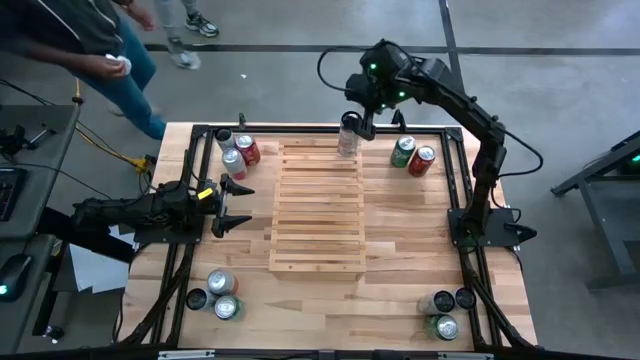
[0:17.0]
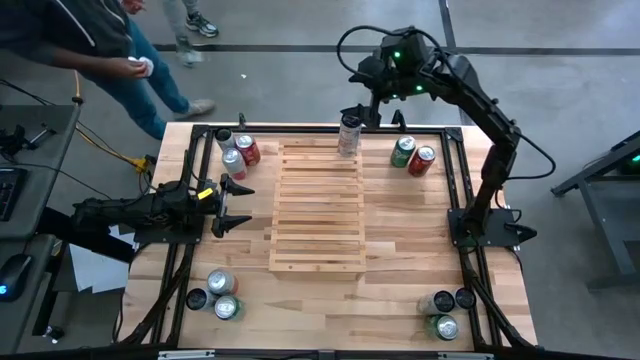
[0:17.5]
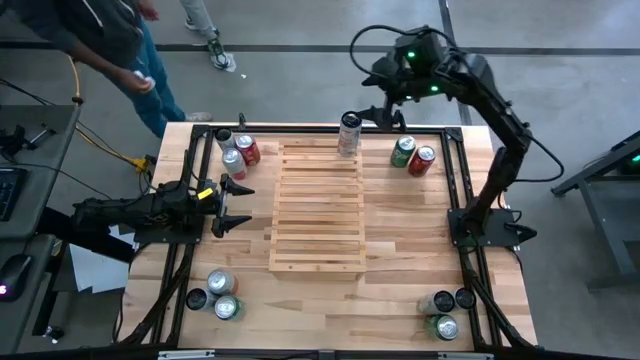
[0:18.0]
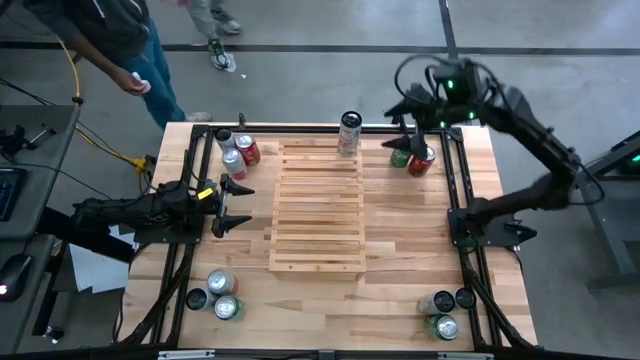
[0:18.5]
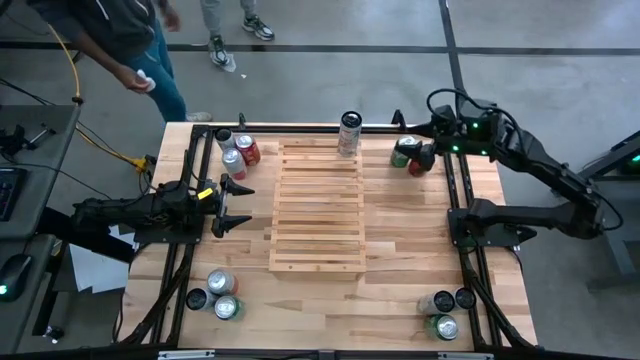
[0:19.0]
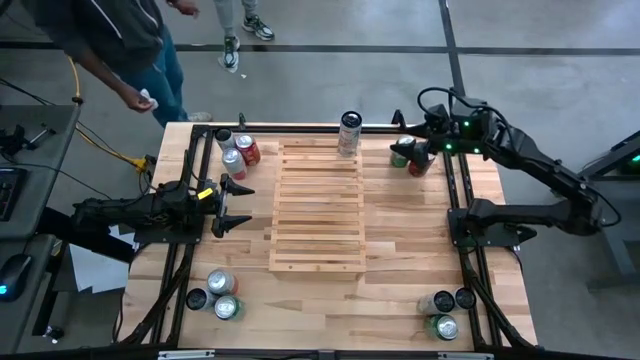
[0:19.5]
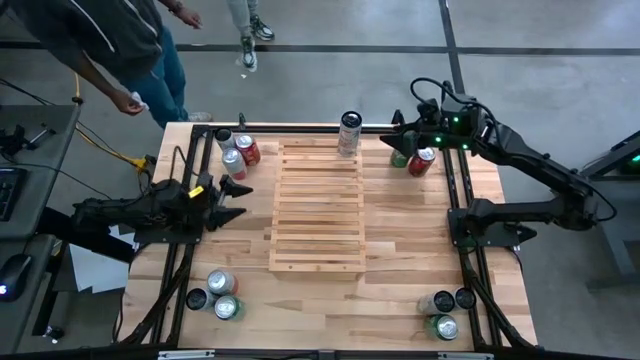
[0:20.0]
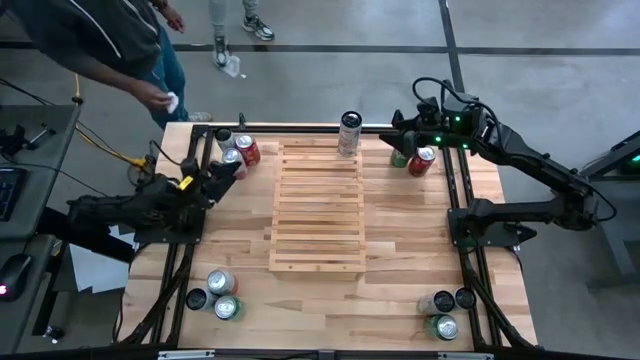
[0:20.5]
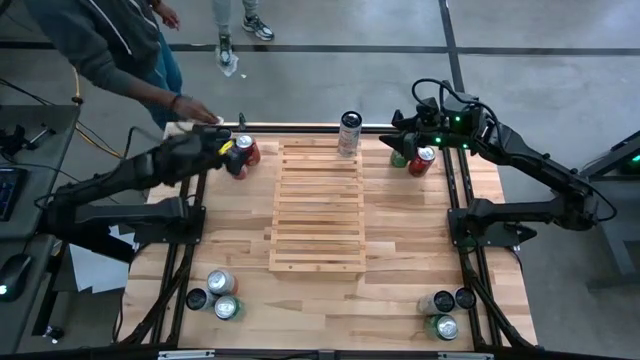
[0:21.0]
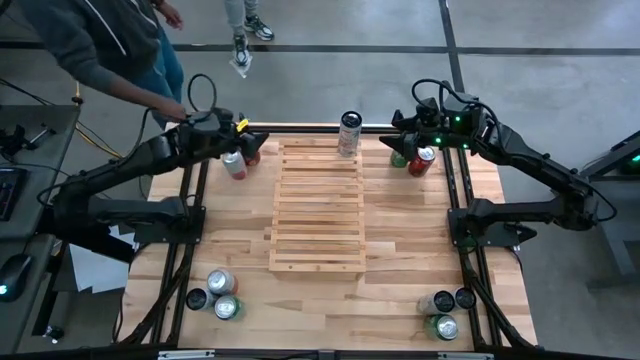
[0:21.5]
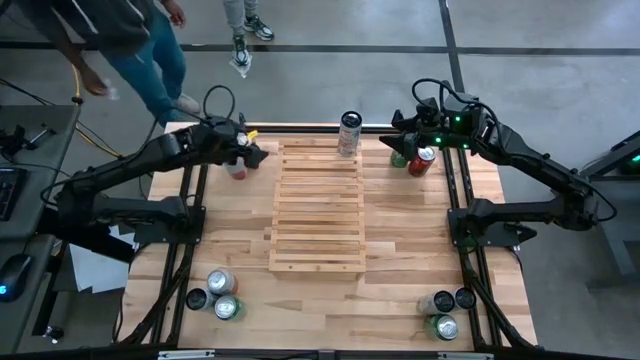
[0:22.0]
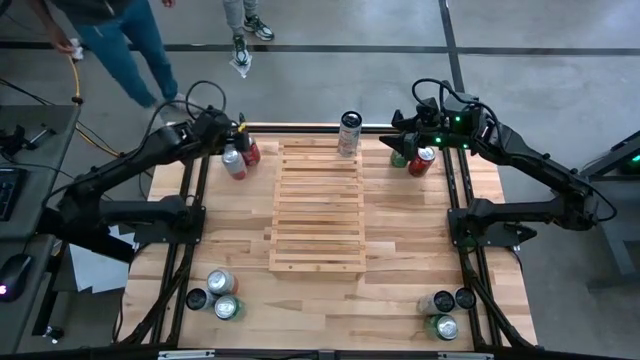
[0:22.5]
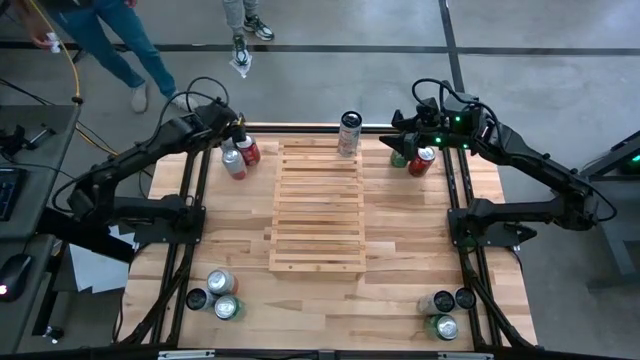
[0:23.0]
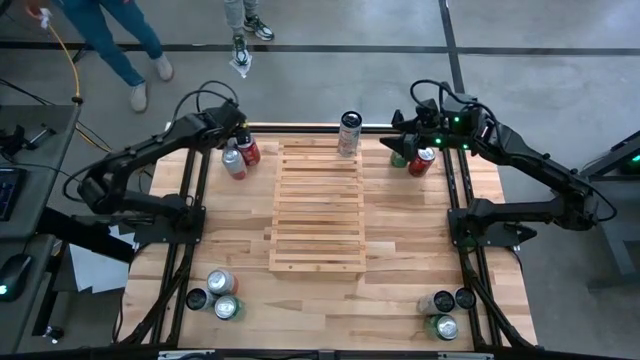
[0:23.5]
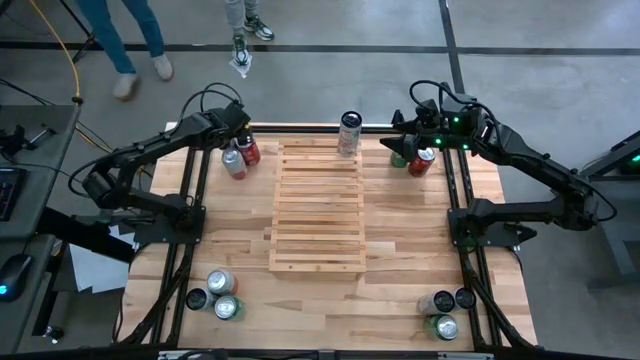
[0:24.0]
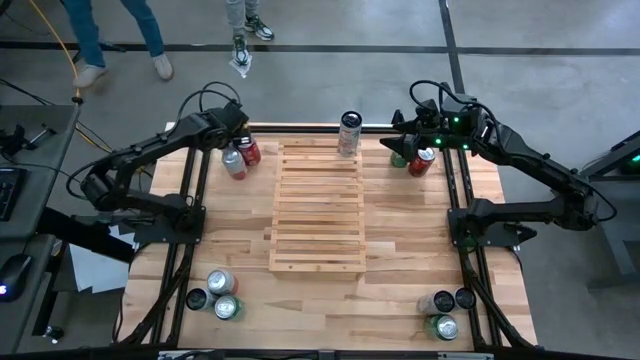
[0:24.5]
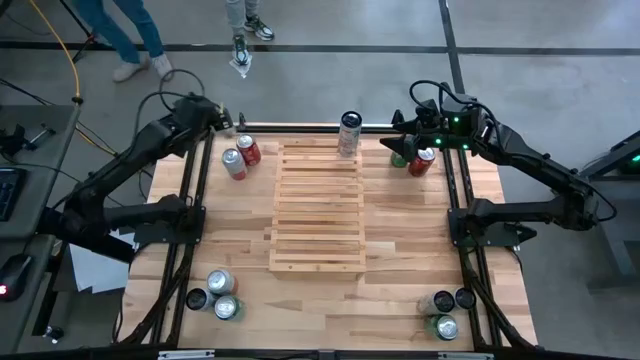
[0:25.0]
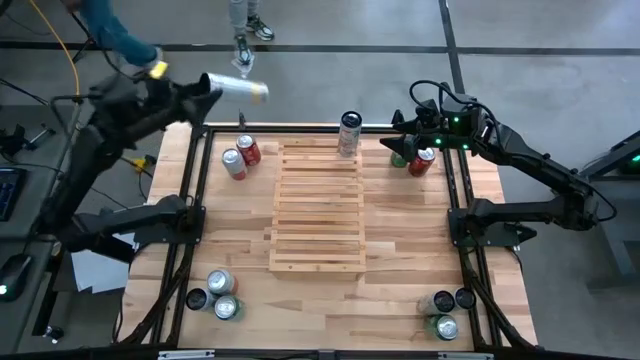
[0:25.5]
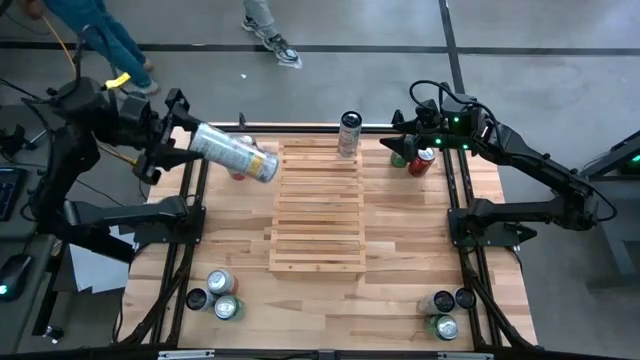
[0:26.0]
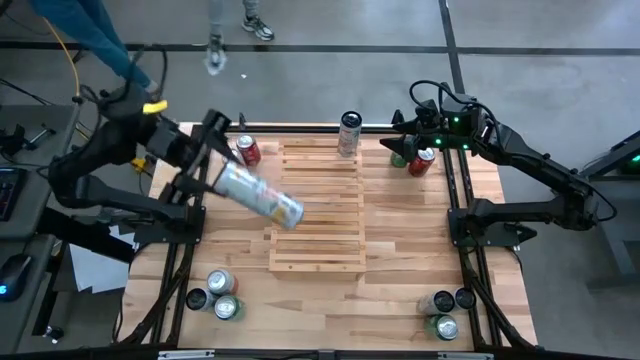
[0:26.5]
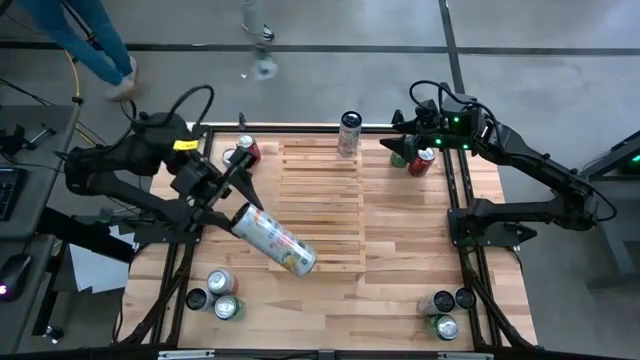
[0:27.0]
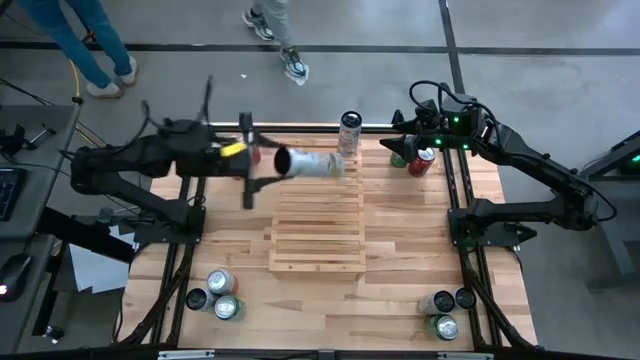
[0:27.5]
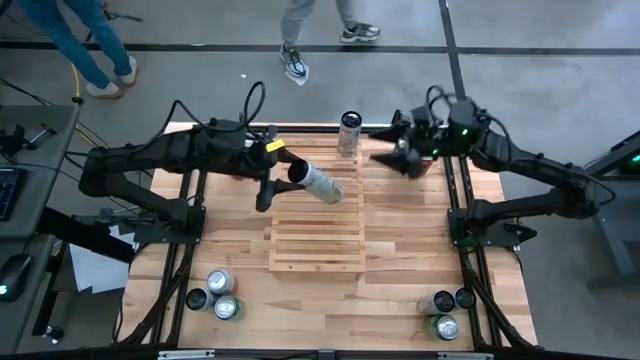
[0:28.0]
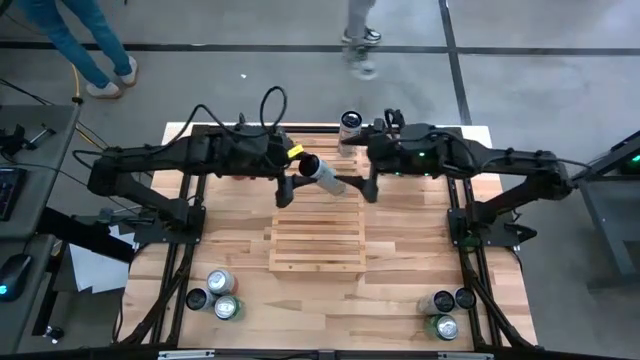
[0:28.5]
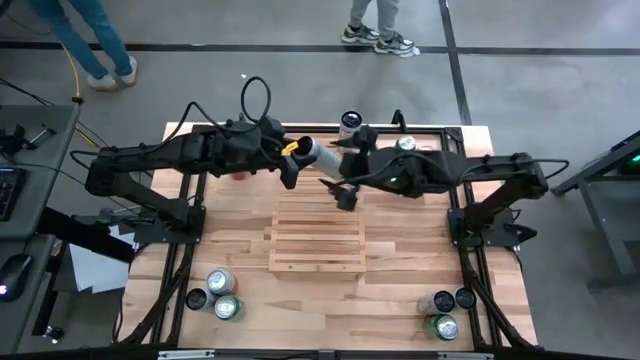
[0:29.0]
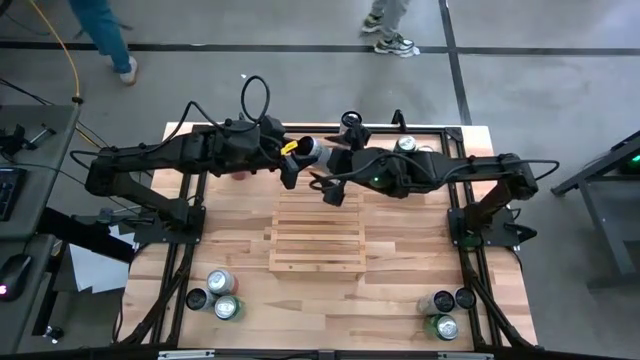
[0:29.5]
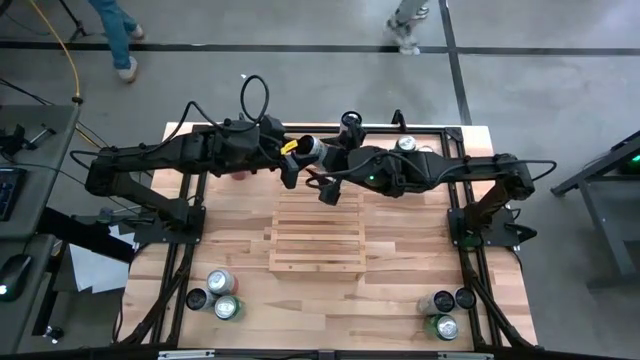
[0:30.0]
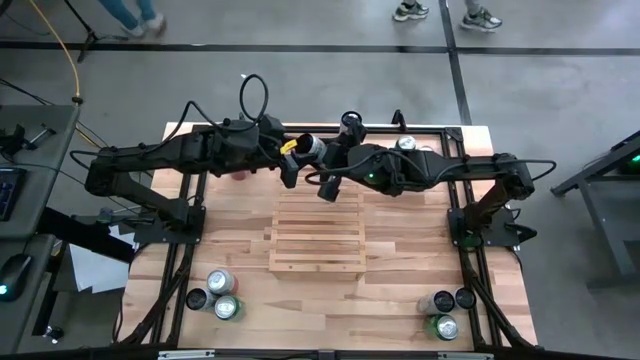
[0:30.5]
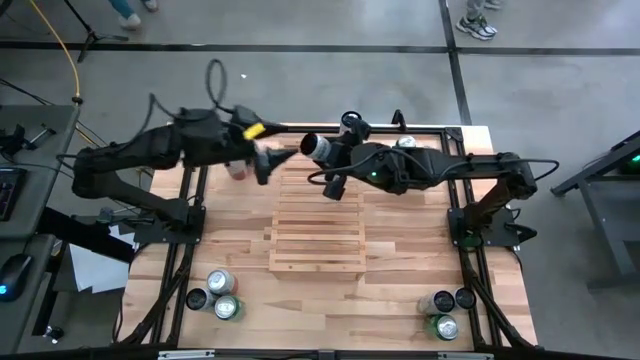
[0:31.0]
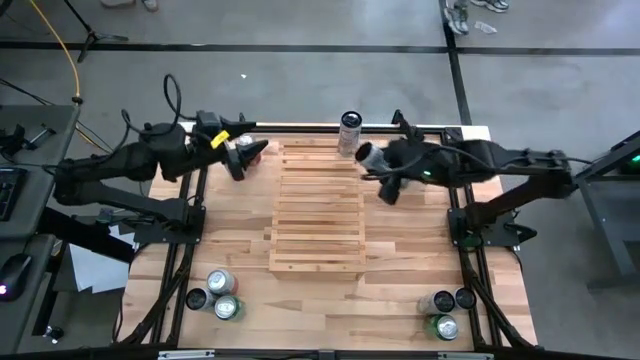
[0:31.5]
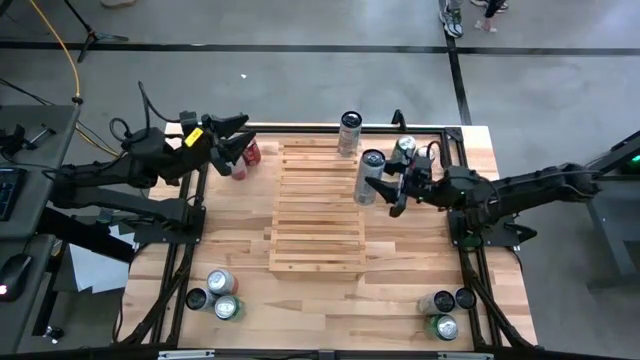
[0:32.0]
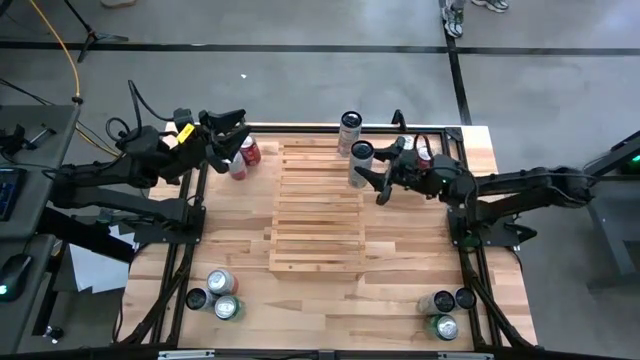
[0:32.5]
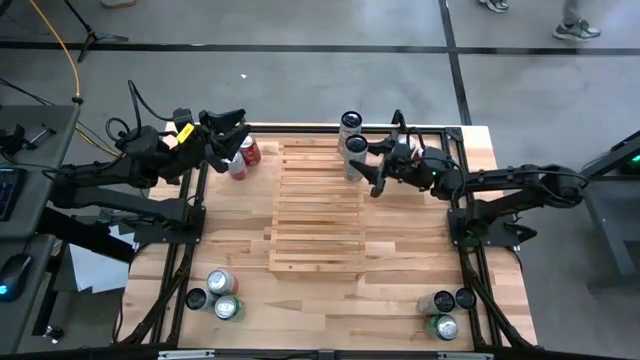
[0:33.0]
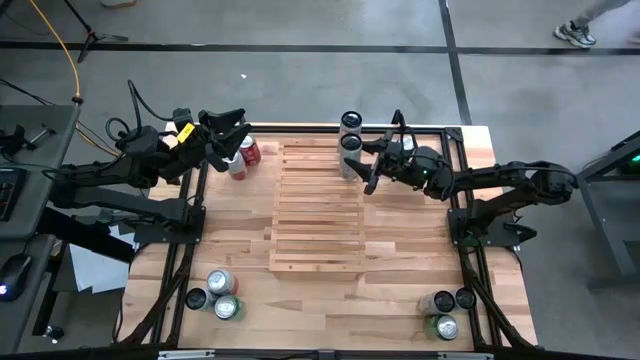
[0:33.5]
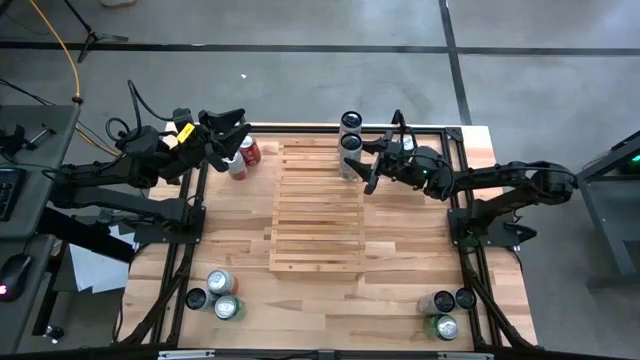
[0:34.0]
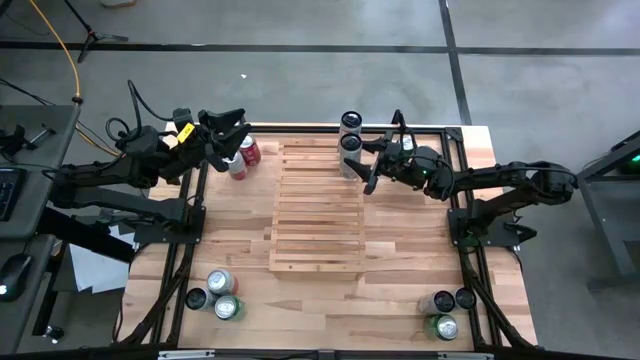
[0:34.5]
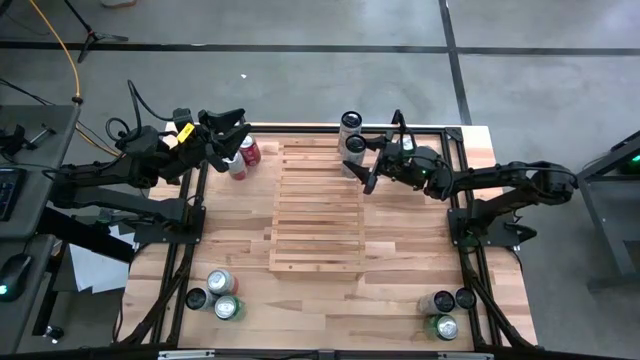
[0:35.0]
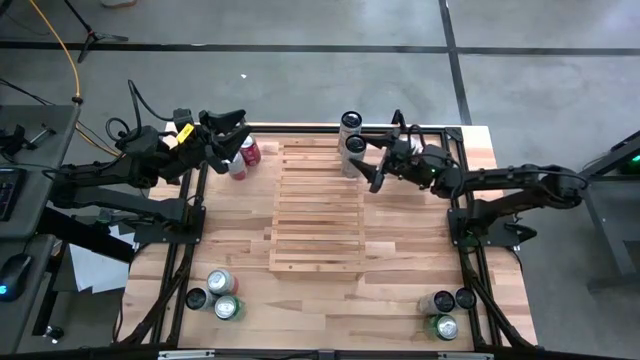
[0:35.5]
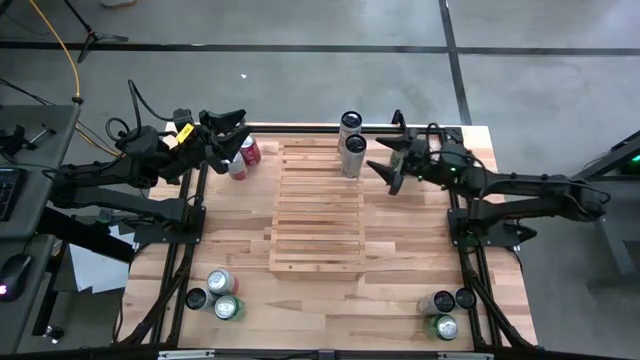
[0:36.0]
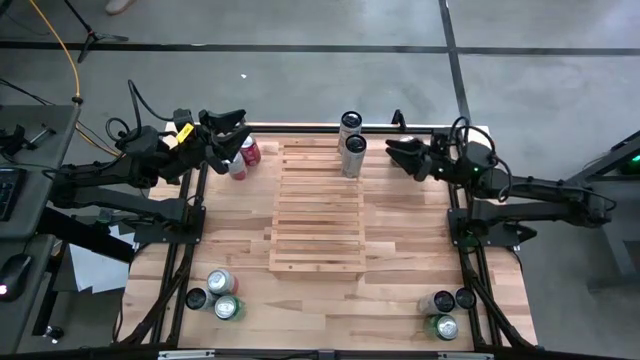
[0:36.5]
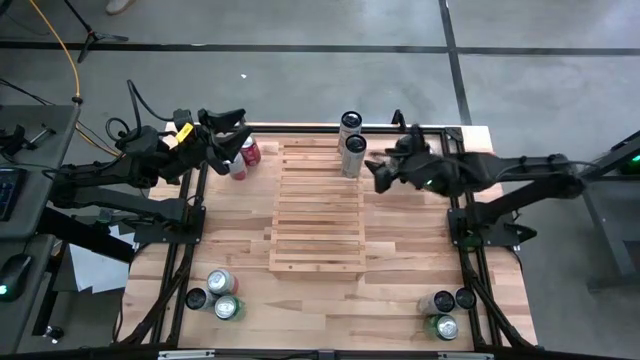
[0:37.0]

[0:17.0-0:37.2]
Task: Place canned beverage on shelf
Put the white pink soda can on the shelf
